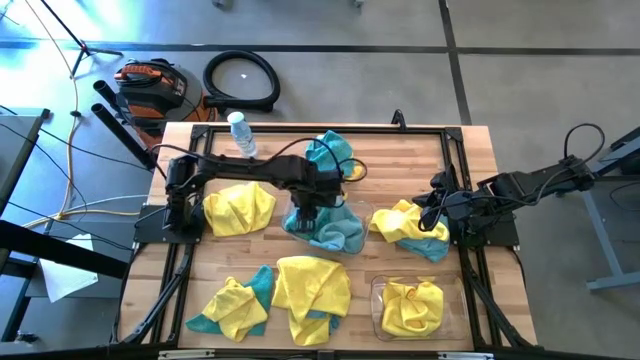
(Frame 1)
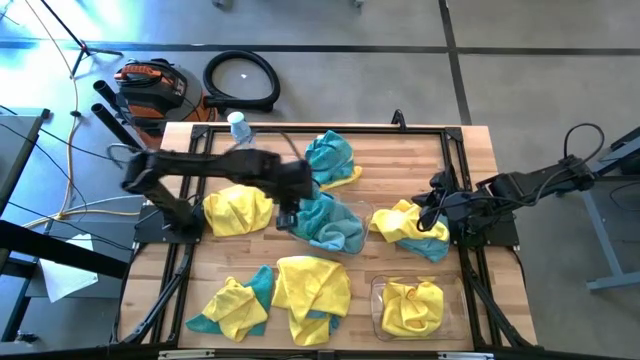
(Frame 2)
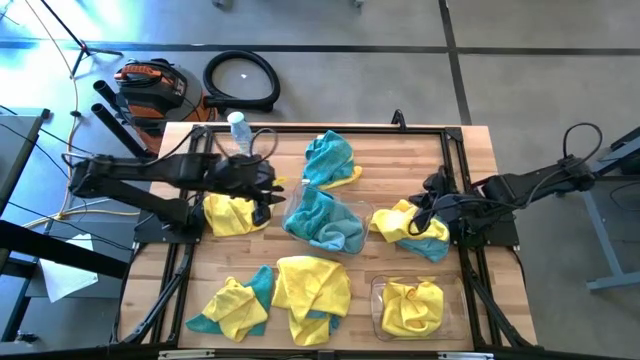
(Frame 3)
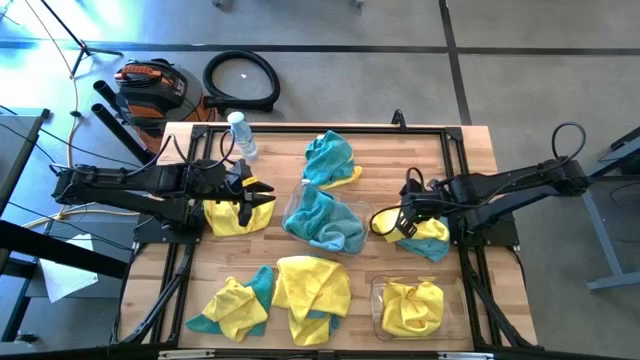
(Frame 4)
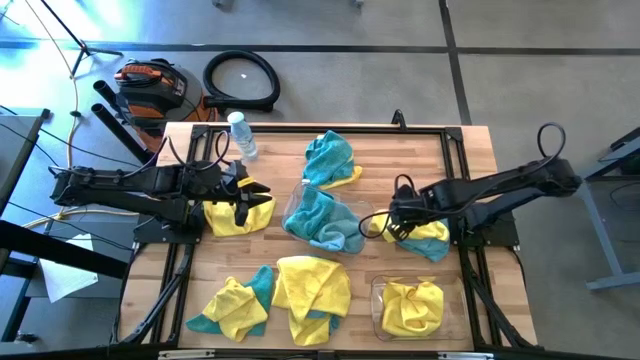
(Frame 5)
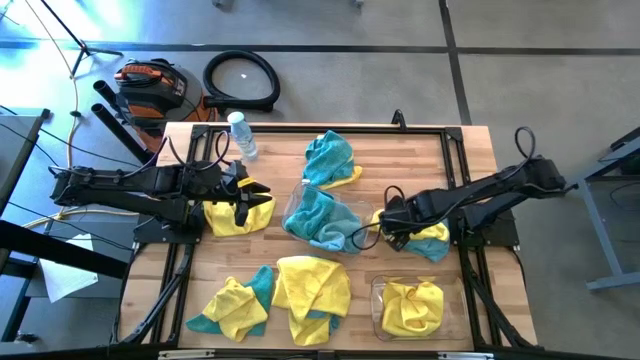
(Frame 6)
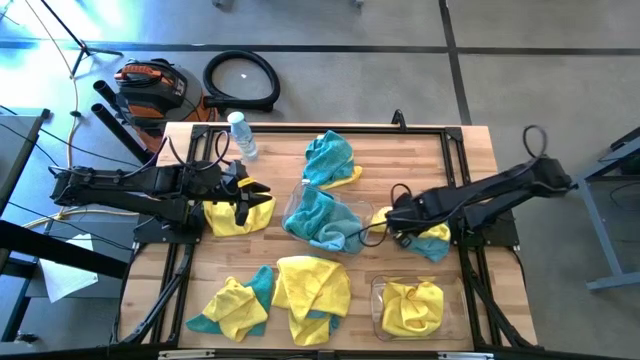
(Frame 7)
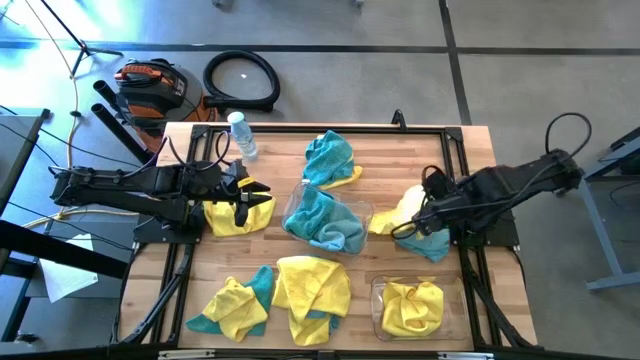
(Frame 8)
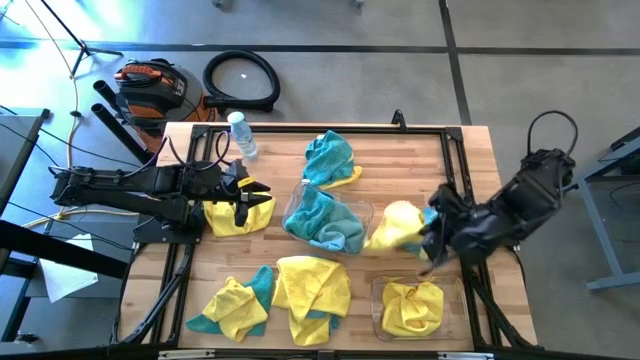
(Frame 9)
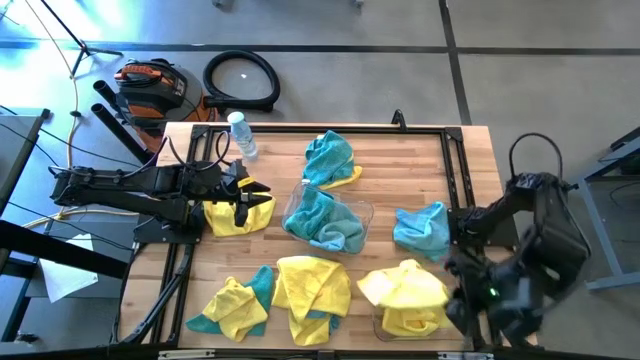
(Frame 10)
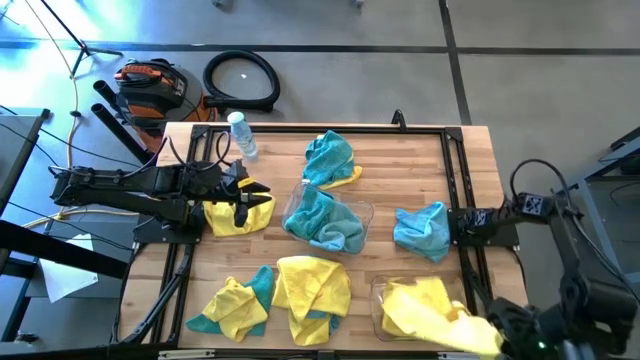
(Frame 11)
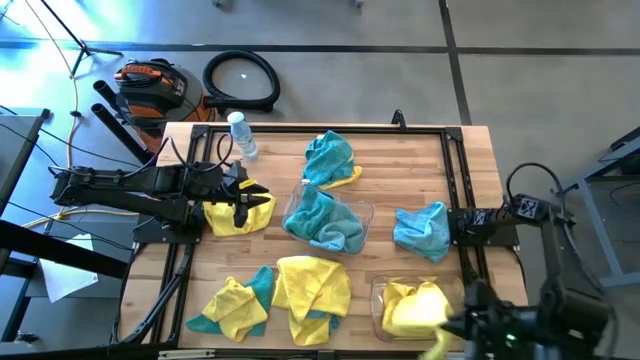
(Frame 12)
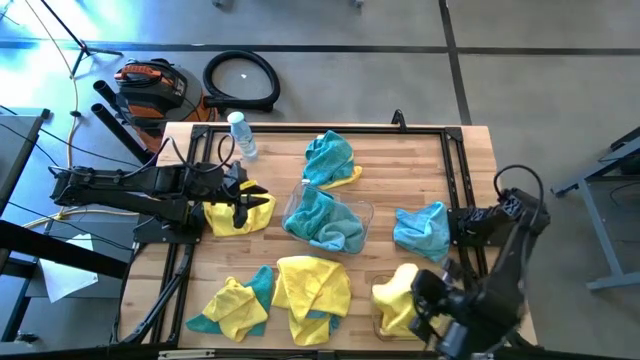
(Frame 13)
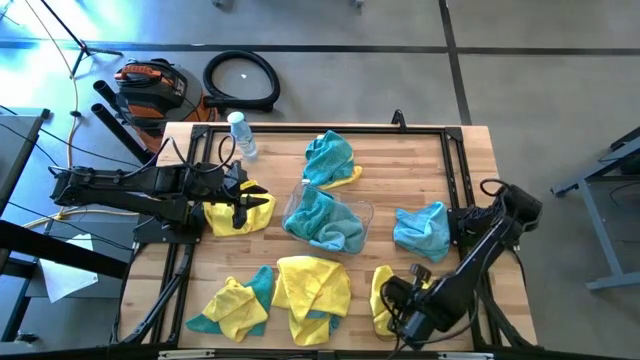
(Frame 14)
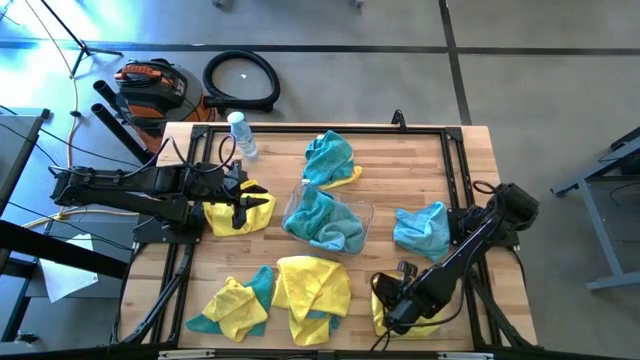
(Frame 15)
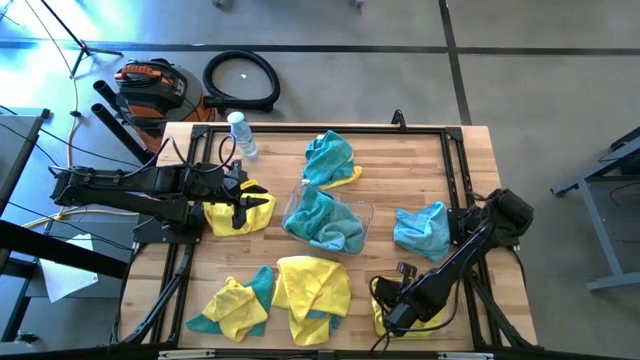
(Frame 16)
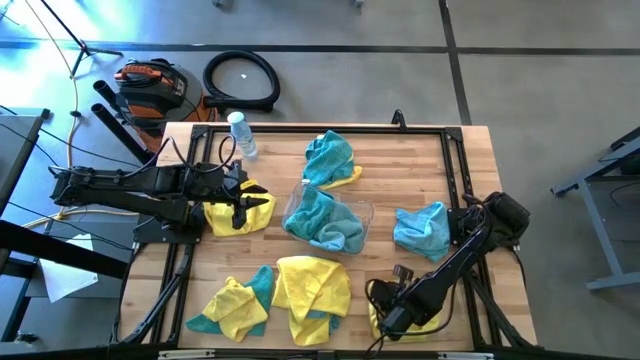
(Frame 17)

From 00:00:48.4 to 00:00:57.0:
Task: Sort microfiber towel by color & place in baskets
Put the yellow towel in the bottom transparent bin

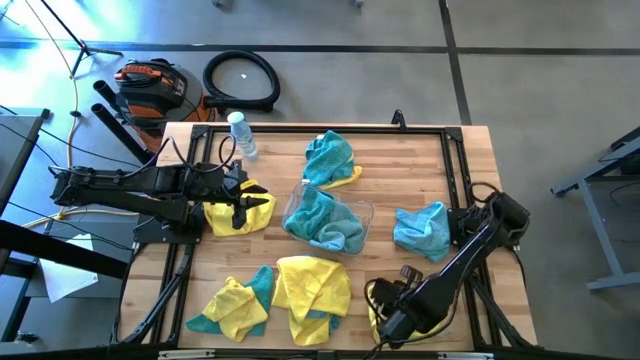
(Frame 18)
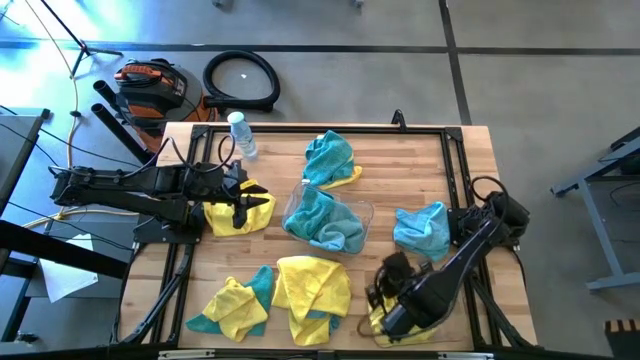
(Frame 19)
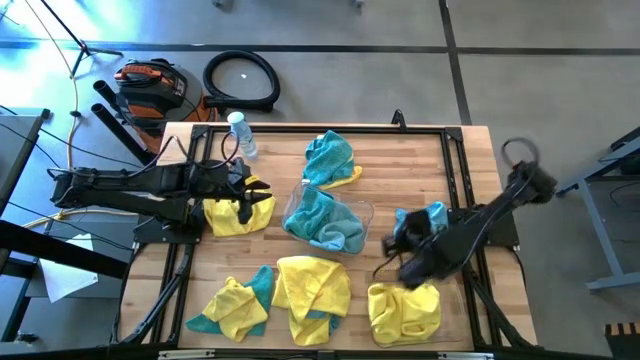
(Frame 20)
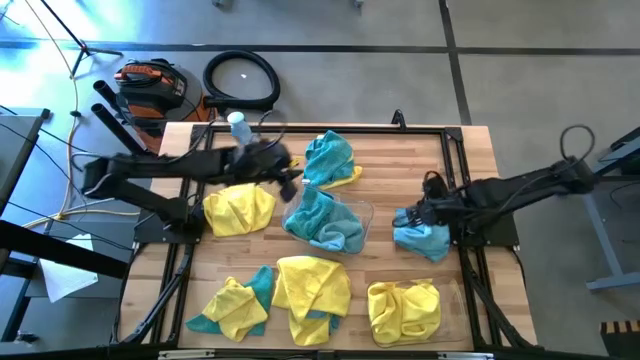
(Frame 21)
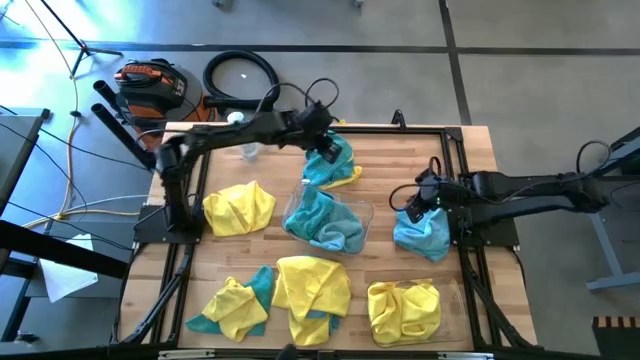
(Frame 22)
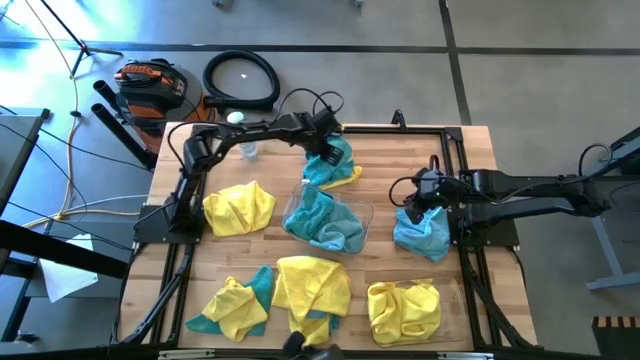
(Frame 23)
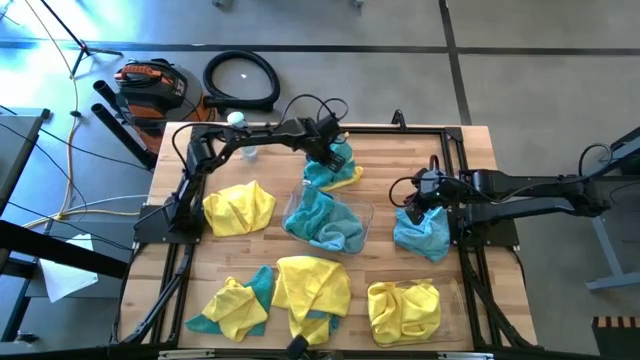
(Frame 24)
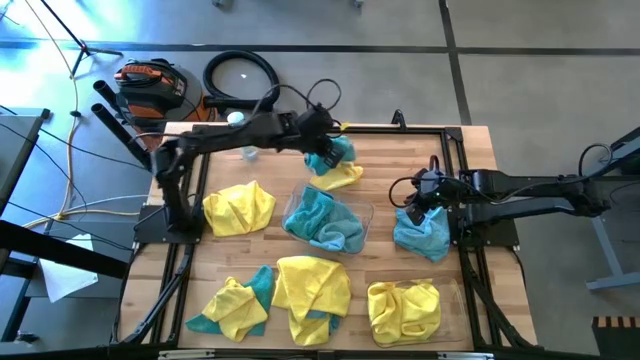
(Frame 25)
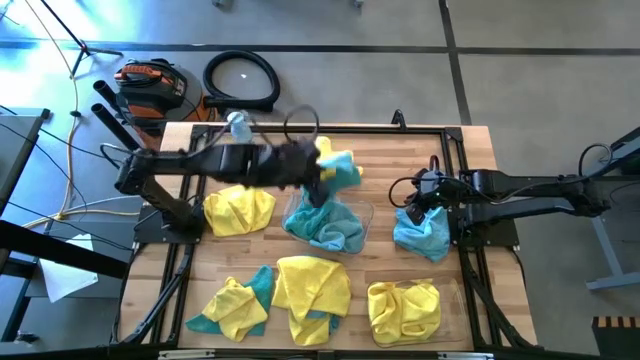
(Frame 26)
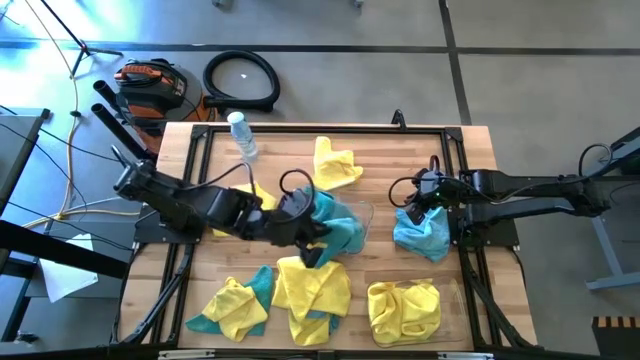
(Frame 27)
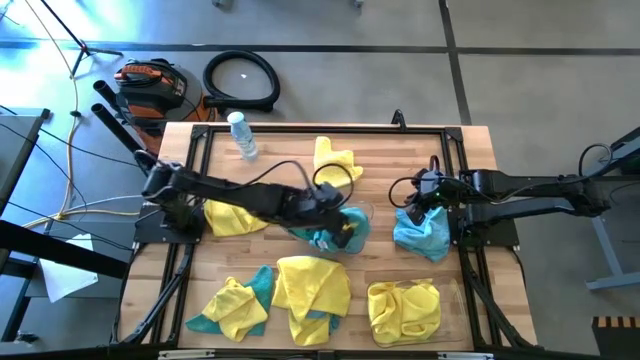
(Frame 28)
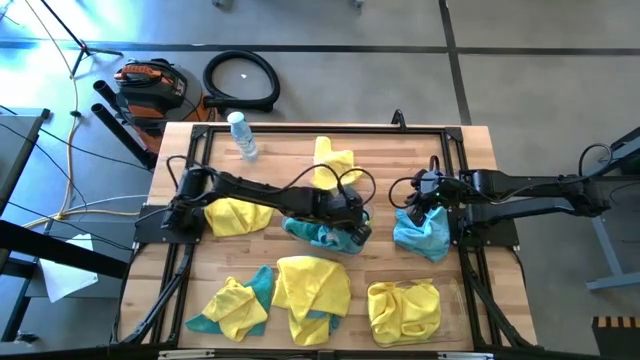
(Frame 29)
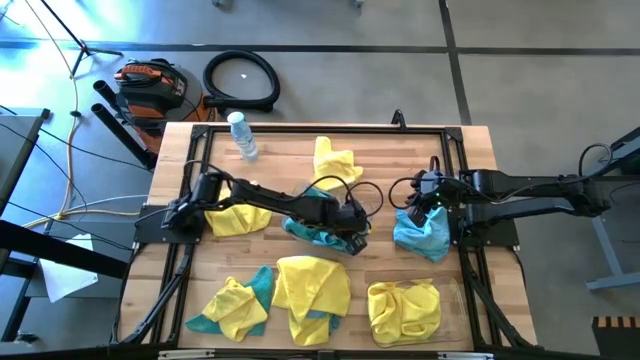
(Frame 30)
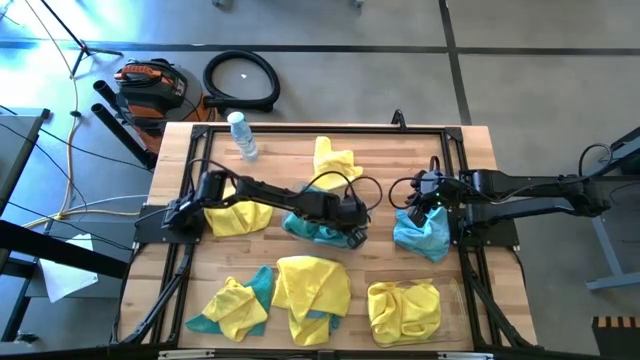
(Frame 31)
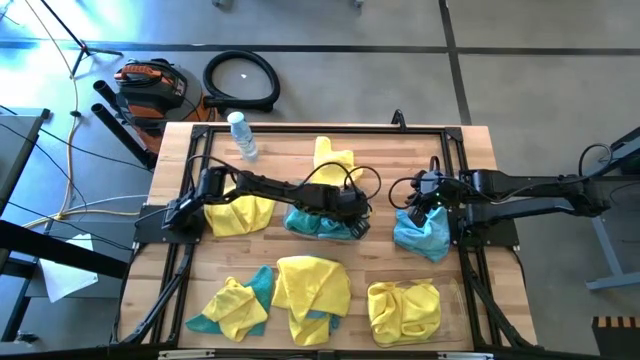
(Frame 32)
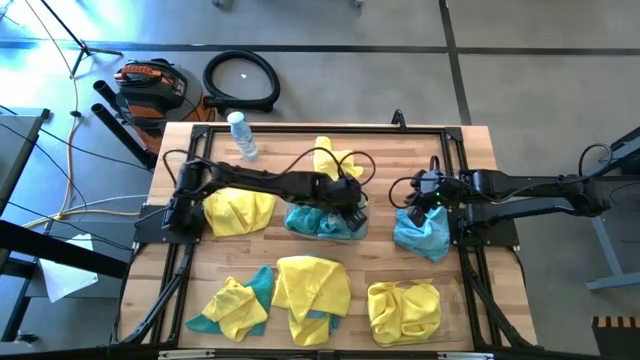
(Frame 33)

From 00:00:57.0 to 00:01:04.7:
Put the blue towel in the top transparent bin

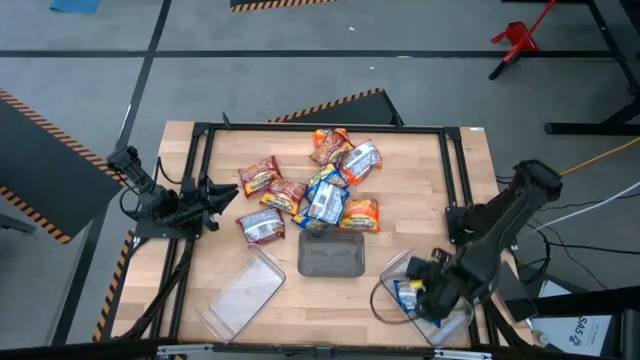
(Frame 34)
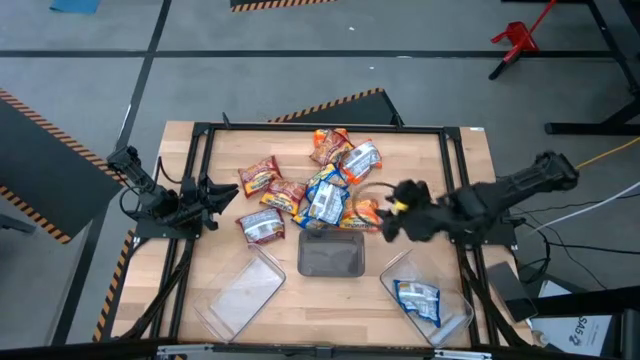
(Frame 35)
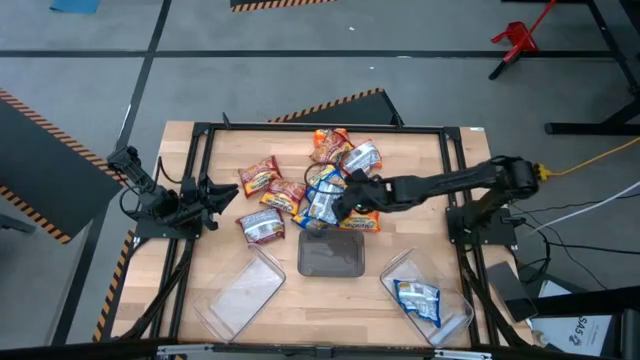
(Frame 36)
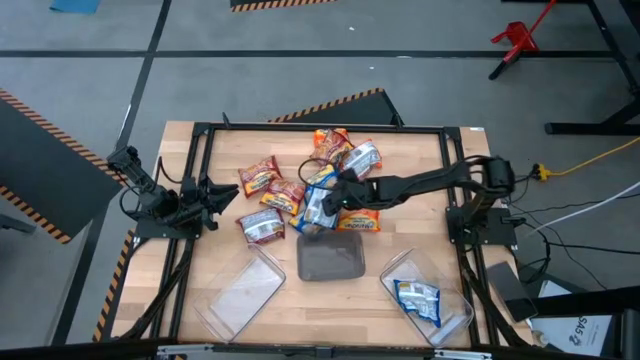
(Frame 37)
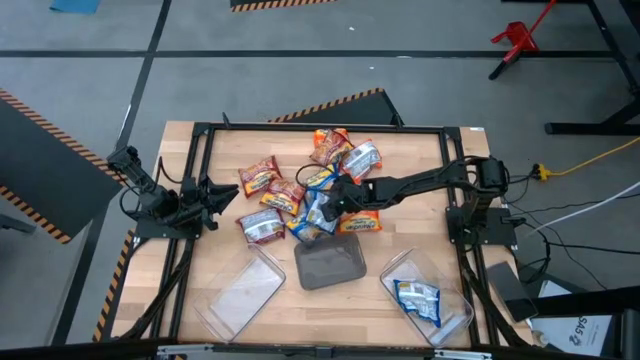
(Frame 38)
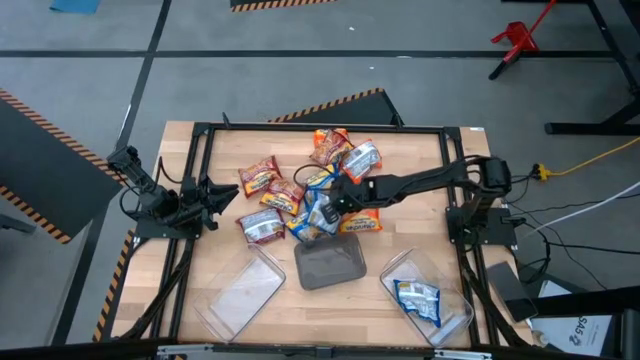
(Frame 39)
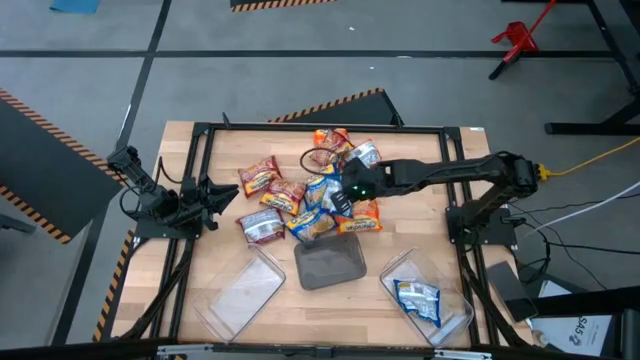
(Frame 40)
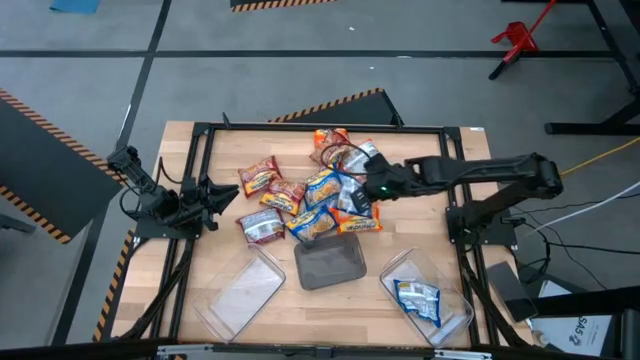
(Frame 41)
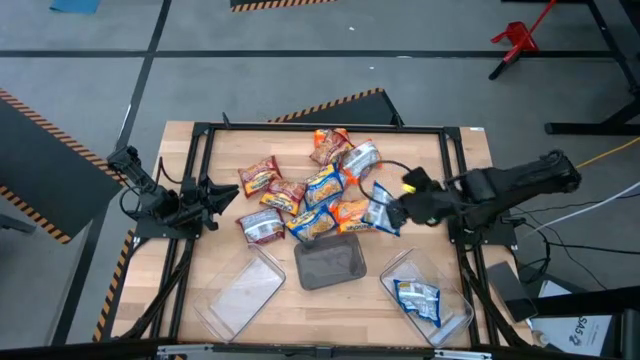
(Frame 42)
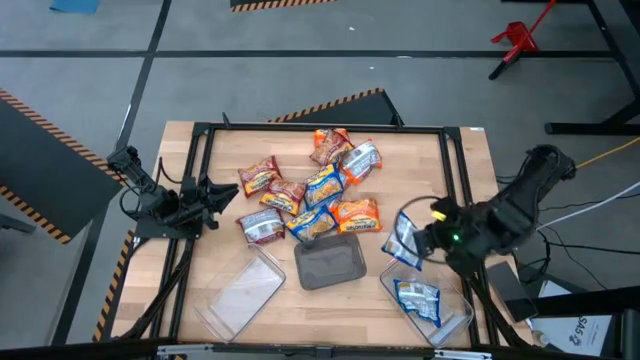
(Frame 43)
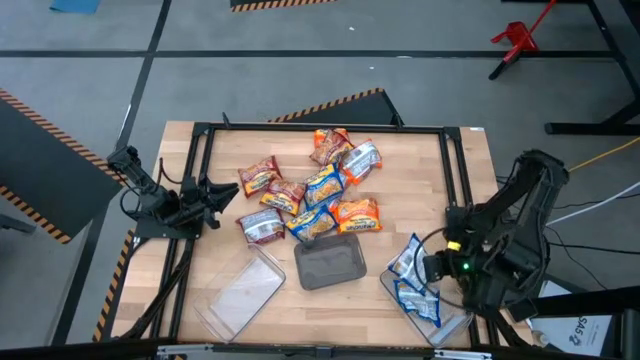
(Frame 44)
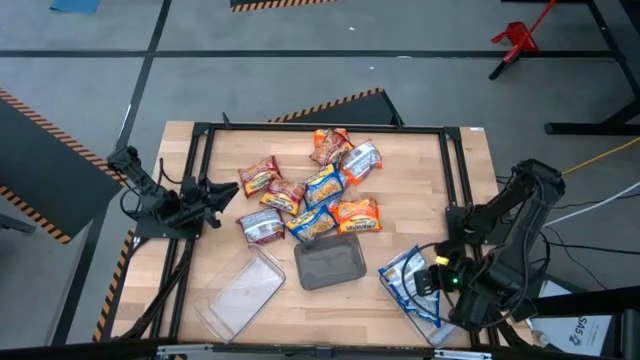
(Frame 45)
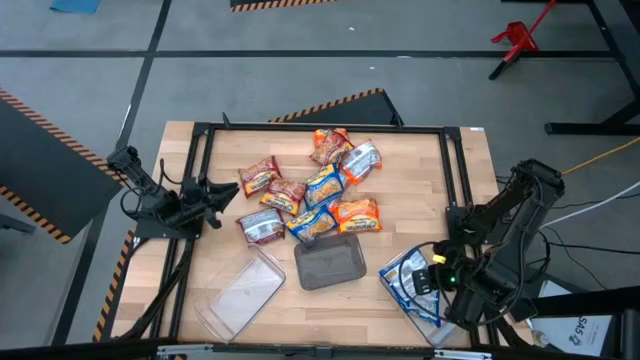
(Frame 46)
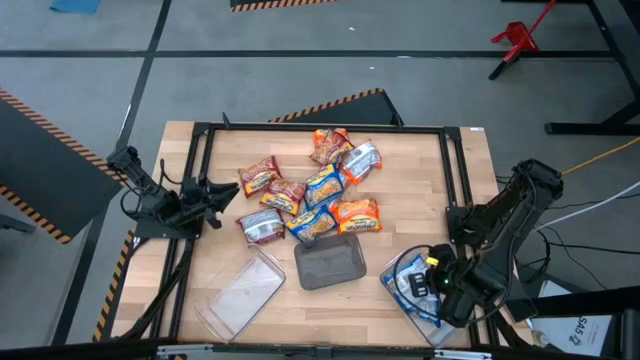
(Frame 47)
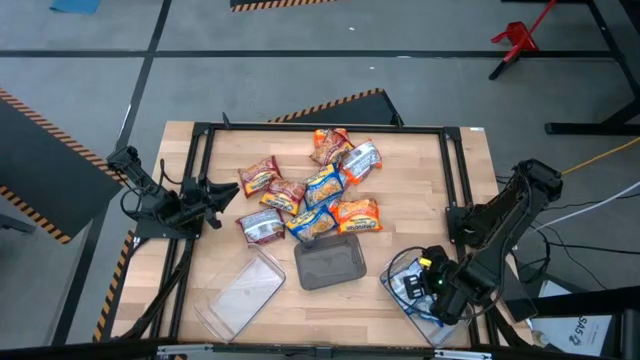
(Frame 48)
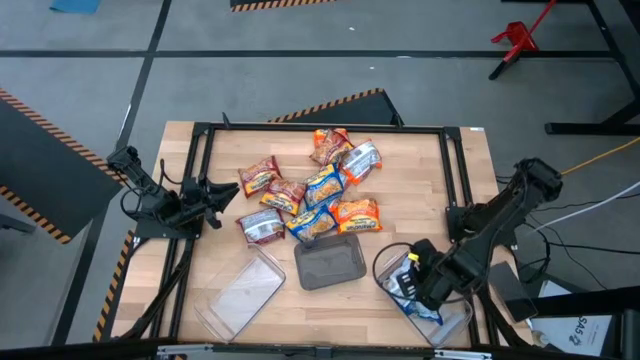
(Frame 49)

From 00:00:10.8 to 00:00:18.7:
Task: Sort Maruchan noodles
Put the blue noodle pack into the right transparent bin
